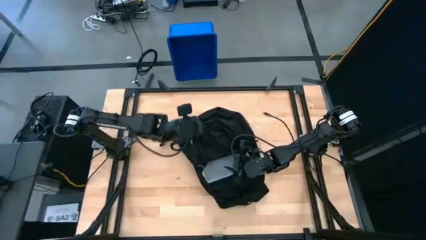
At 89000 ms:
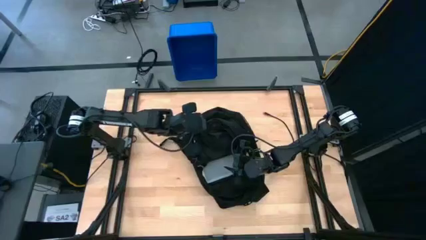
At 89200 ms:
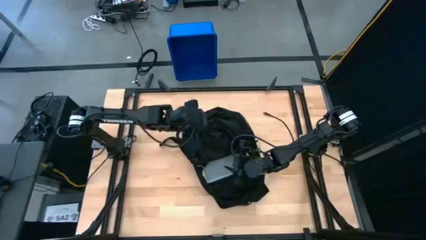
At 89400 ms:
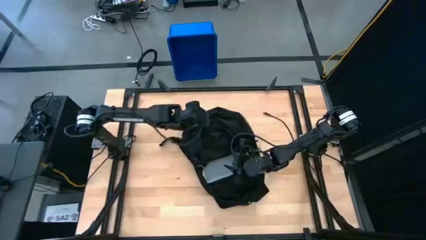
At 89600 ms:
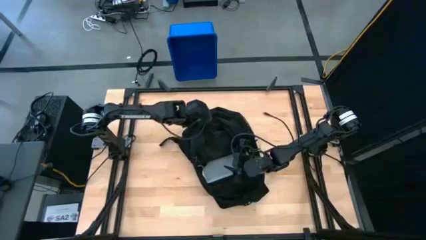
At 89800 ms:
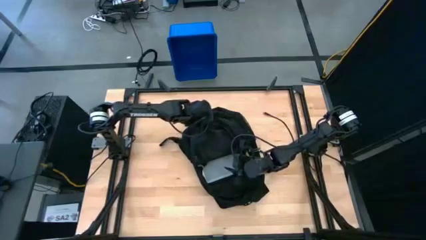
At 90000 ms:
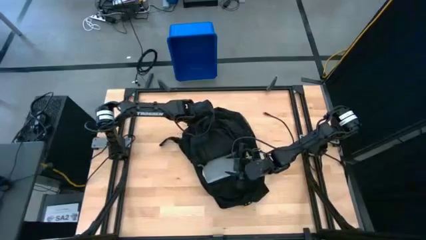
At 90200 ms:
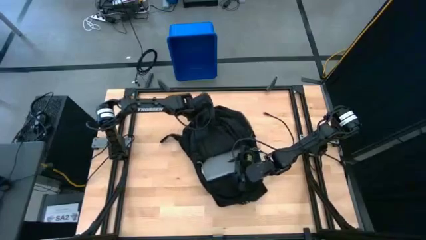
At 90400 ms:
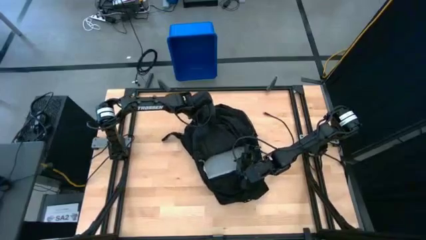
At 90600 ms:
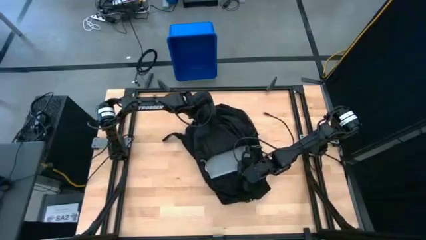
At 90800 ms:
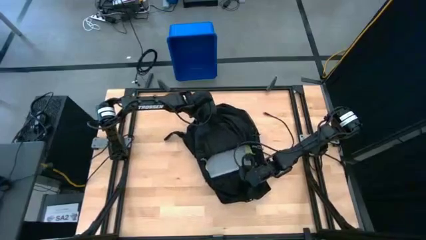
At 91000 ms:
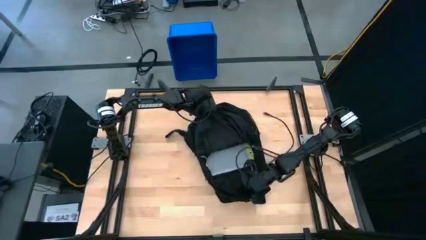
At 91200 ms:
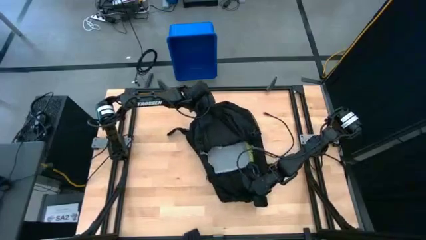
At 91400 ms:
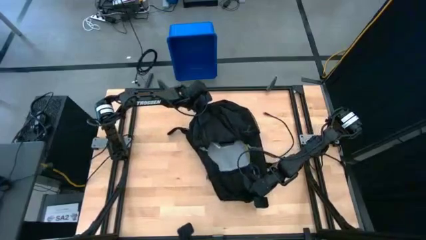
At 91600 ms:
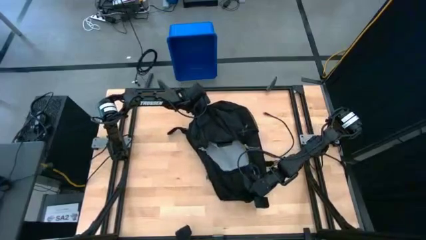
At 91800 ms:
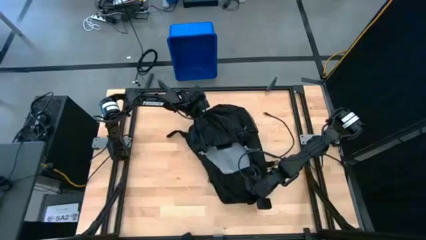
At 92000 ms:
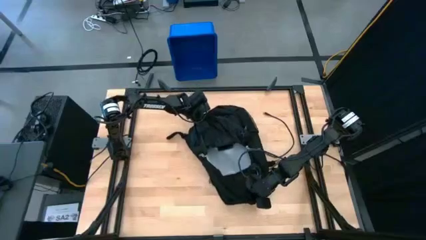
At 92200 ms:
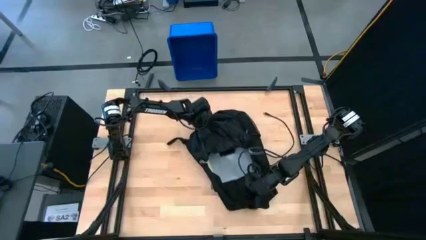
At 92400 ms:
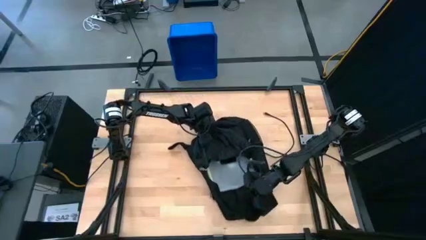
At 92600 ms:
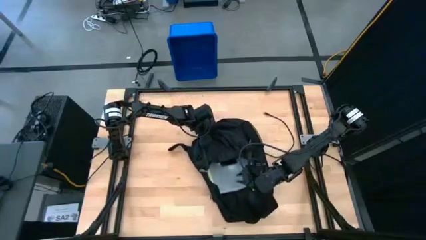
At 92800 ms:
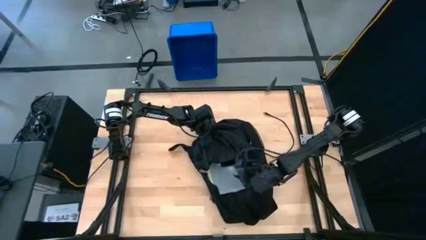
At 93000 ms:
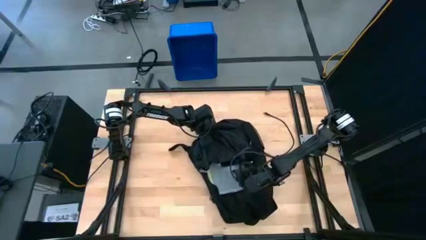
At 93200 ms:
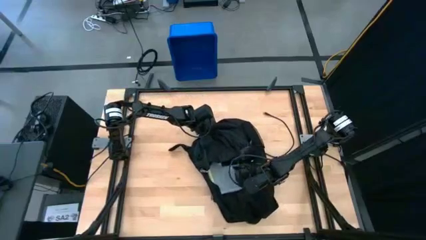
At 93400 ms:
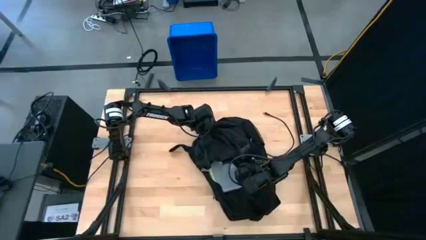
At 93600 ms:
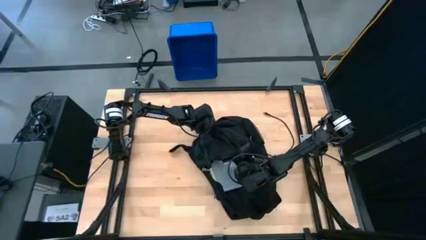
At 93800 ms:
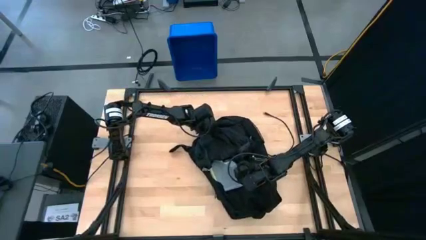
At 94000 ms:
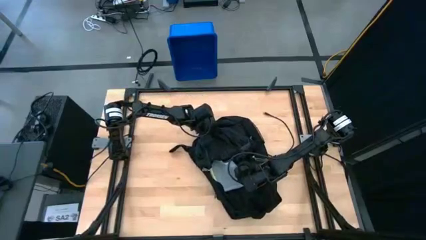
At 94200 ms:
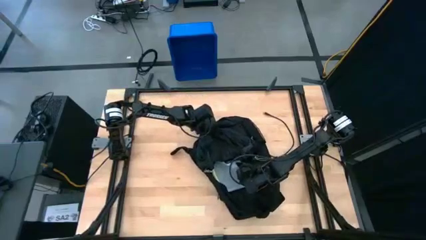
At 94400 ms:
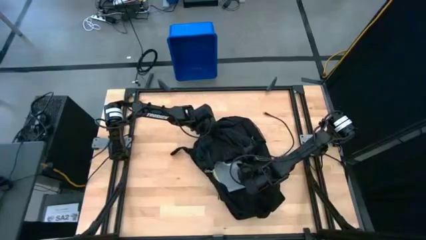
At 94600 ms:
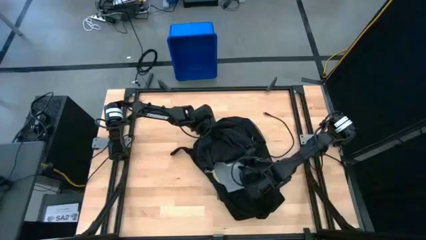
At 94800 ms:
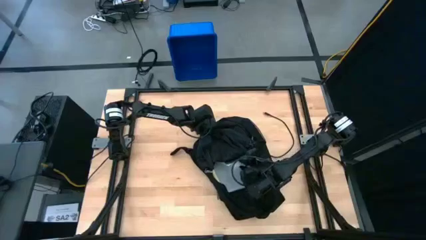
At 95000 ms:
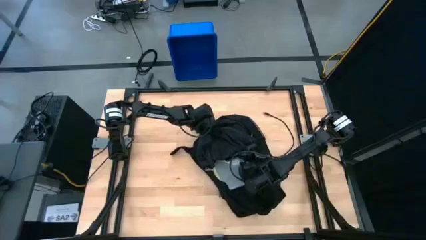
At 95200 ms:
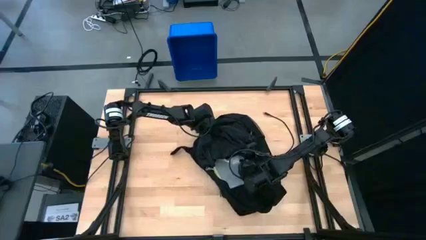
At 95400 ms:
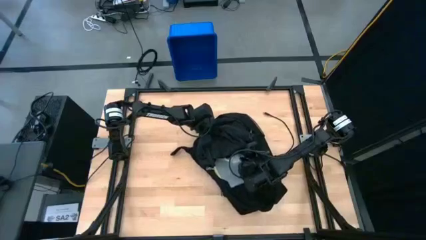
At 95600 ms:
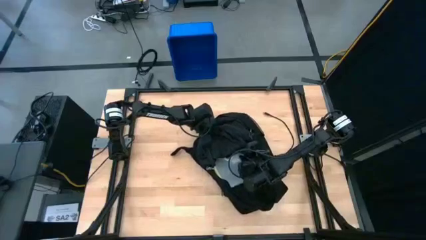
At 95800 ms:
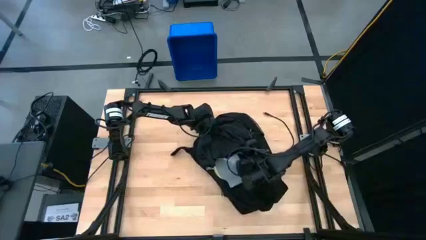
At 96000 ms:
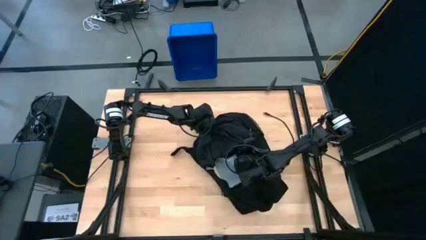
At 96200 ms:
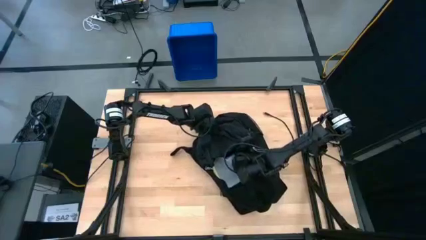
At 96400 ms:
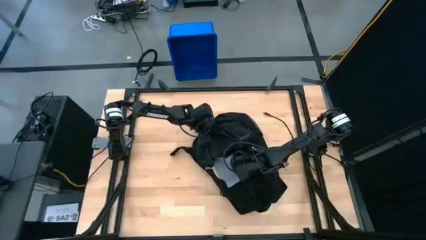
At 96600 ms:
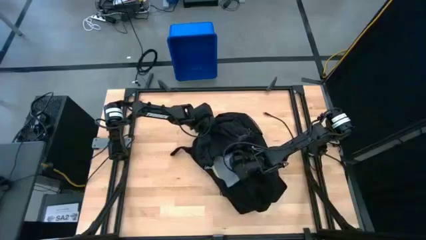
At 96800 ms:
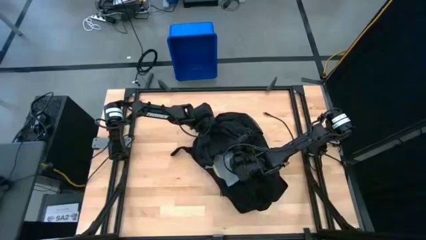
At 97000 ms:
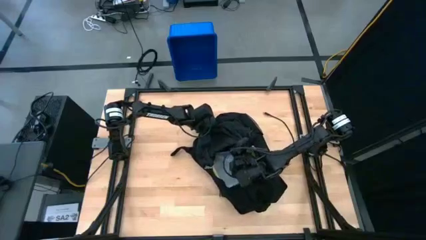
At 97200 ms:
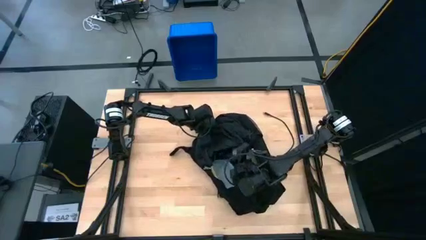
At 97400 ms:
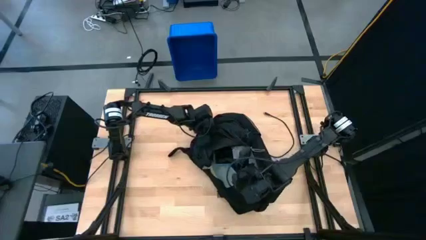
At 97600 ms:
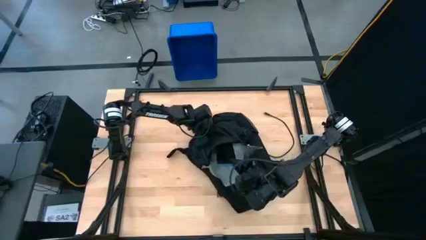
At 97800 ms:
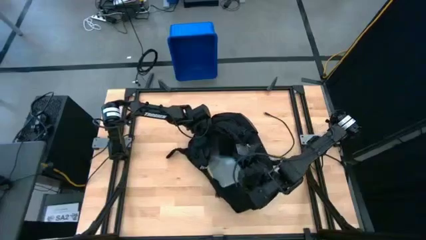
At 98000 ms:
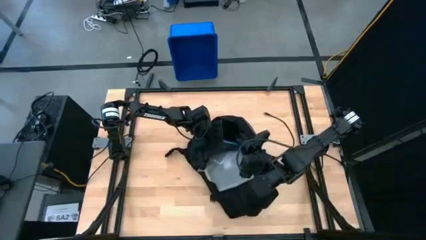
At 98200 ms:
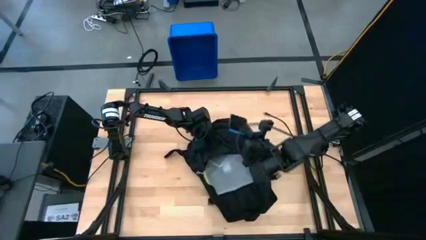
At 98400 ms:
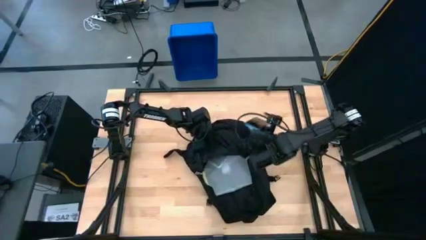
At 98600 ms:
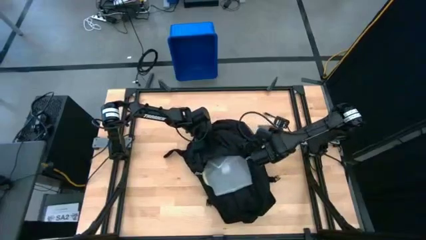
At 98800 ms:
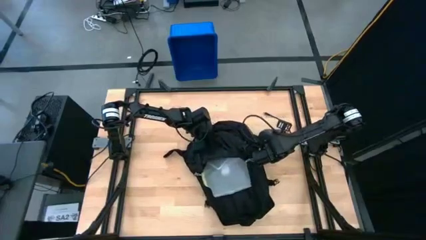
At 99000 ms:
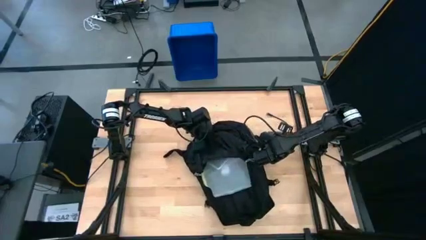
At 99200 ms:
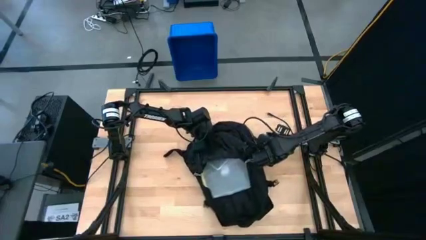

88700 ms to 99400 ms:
Task: Unpack backpack
Remove the phone from the backpack

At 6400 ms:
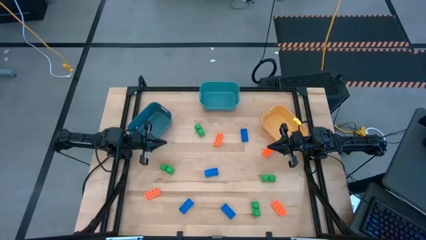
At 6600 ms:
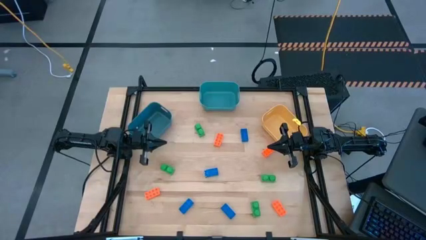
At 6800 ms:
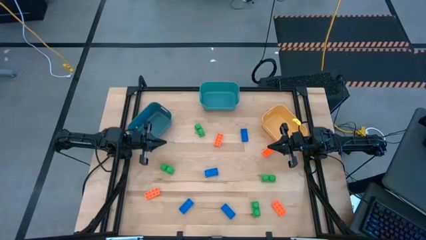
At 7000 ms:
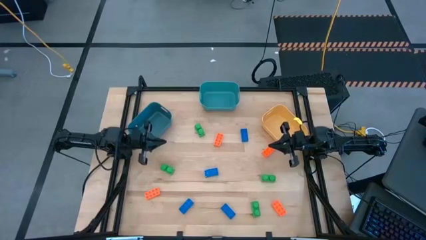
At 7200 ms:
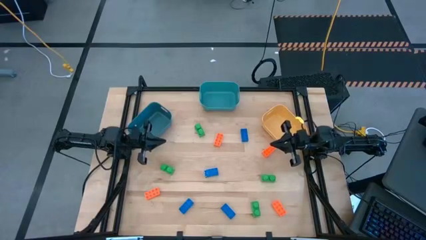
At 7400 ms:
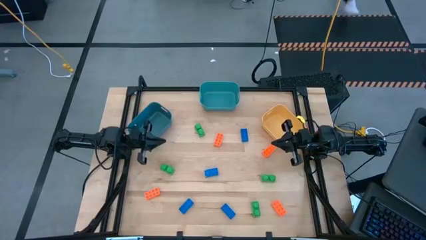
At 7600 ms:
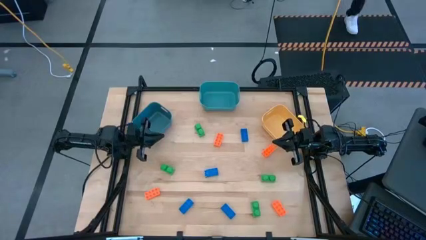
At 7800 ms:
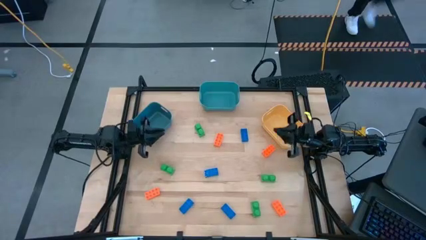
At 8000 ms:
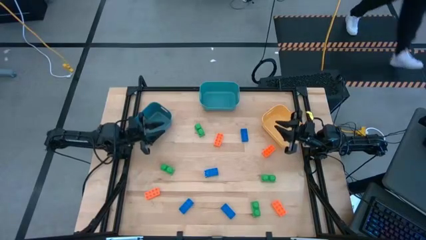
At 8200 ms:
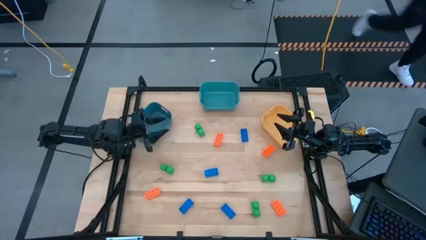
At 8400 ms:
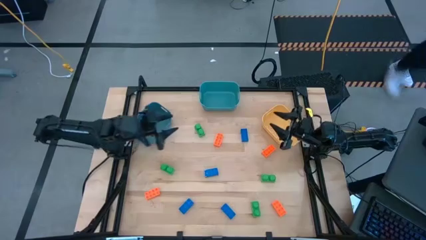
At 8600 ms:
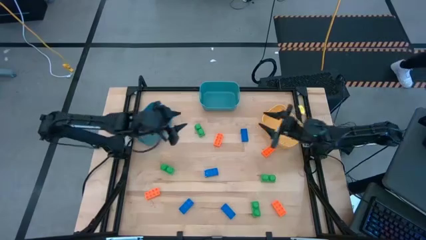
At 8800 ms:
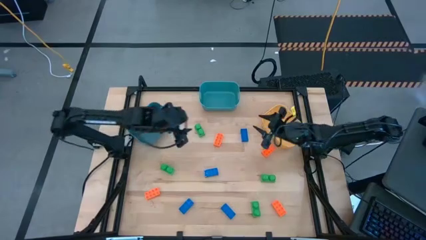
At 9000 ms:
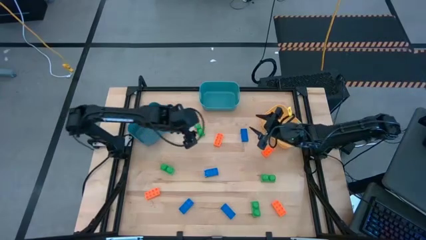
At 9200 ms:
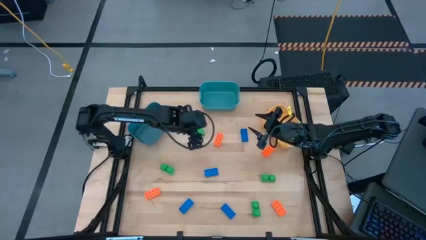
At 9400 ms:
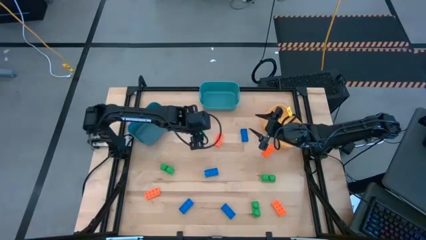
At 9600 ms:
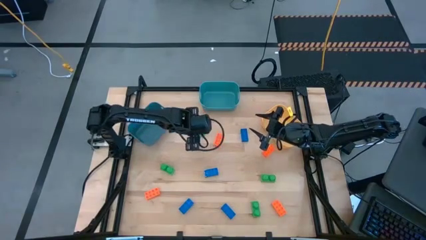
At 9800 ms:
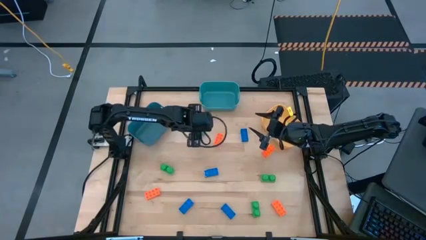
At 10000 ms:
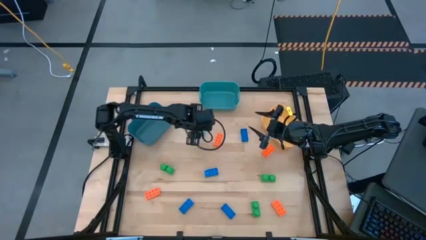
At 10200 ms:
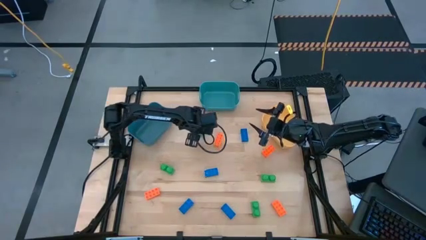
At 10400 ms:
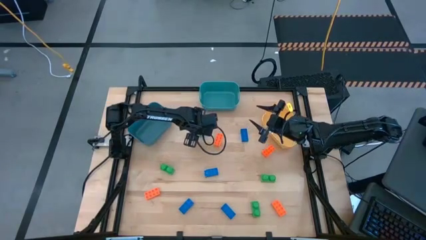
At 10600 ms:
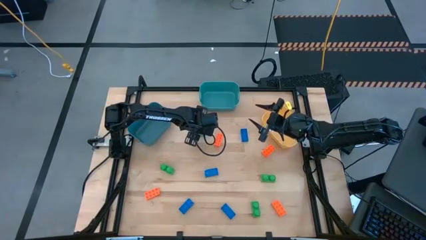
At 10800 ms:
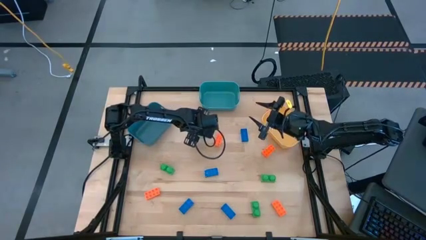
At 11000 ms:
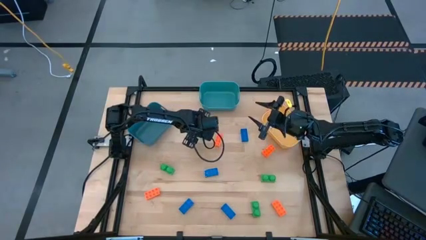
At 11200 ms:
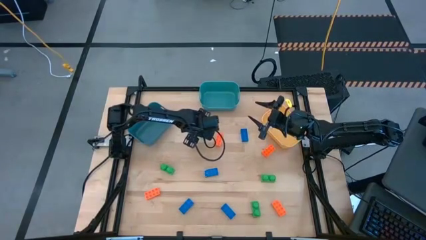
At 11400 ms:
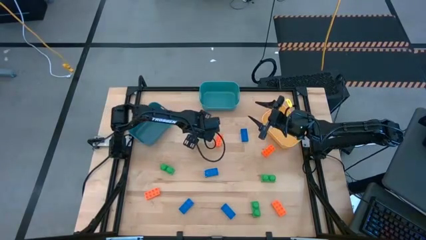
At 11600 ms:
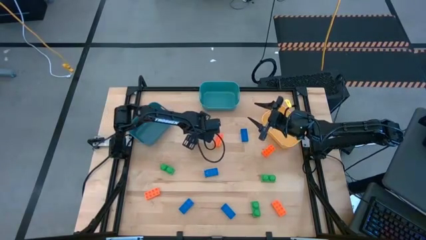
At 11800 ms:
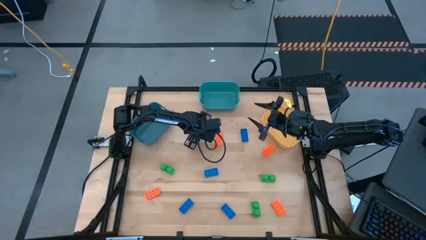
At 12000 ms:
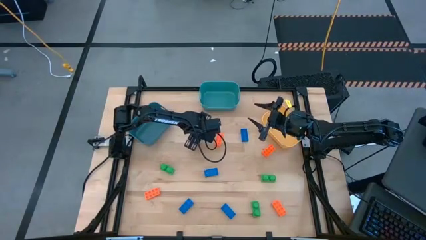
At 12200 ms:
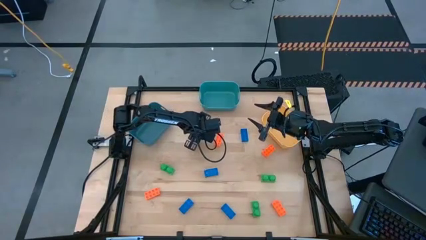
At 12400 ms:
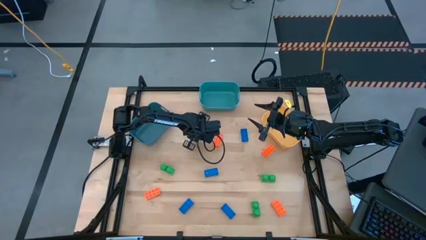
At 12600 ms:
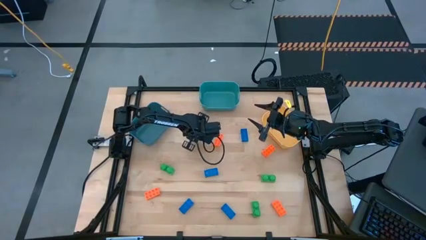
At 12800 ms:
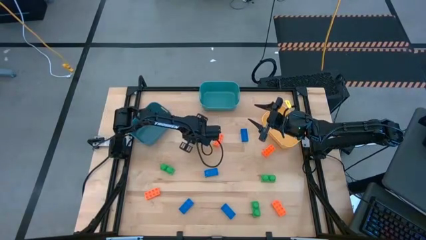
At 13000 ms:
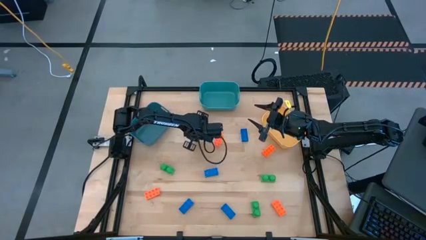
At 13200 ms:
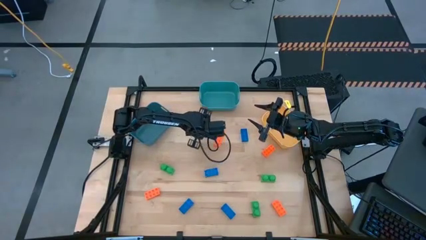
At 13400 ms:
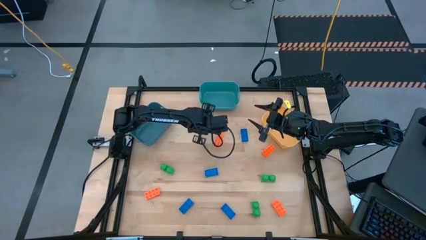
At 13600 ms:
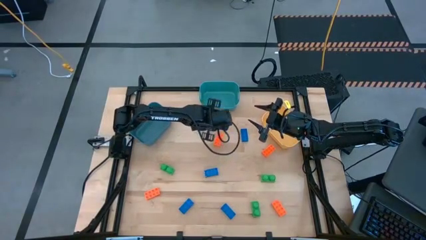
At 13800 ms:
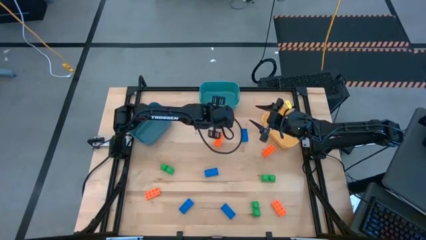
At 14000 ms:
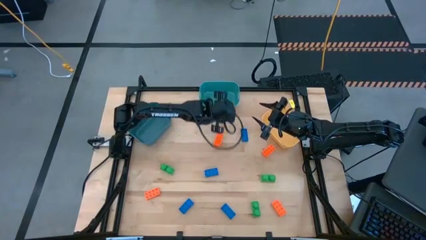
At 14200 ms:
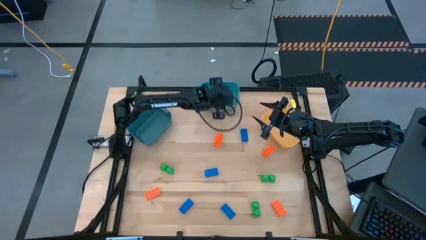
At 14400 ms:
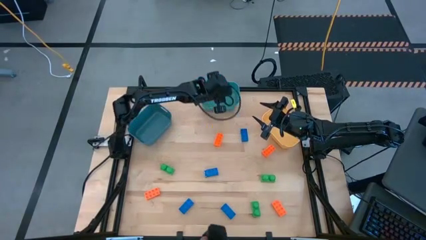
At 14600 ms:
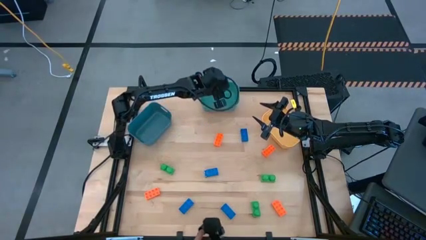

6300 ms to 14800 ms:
Task: Sort & place blocks by color
Put the green game piece into the green bin
